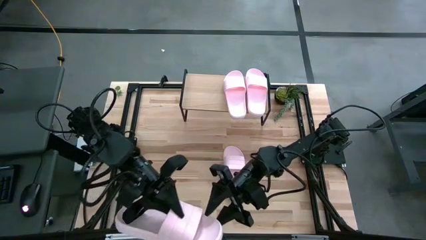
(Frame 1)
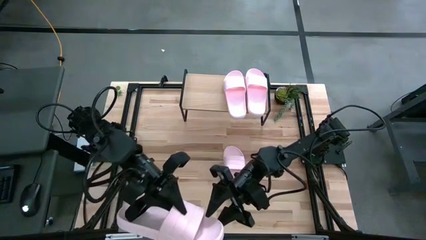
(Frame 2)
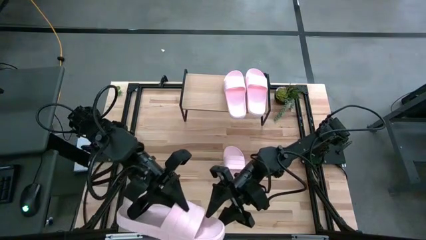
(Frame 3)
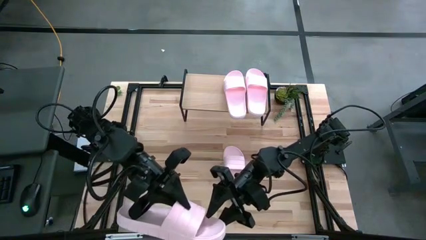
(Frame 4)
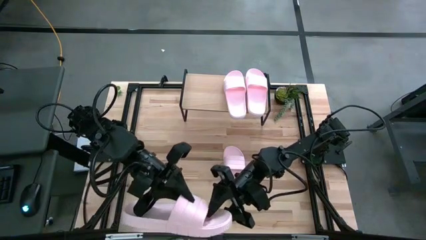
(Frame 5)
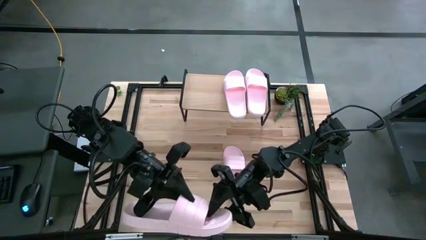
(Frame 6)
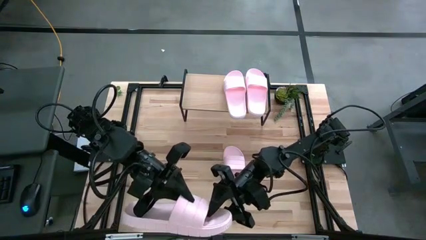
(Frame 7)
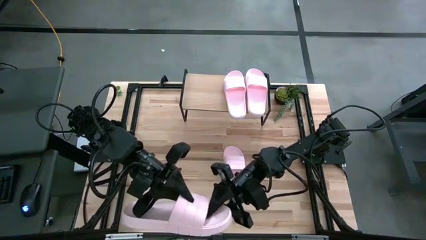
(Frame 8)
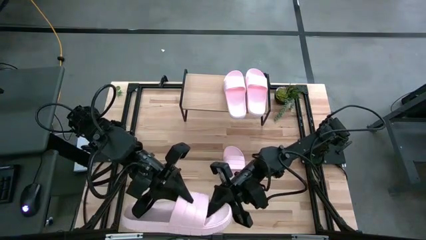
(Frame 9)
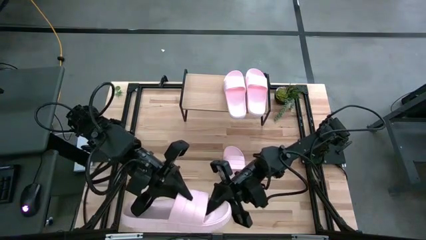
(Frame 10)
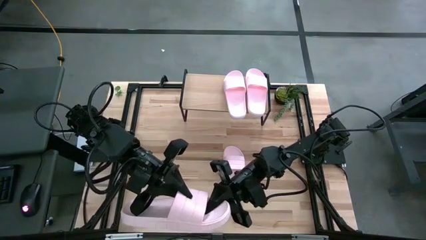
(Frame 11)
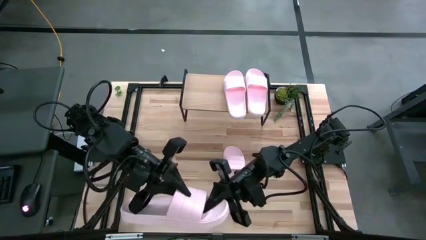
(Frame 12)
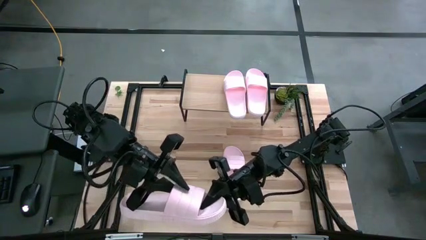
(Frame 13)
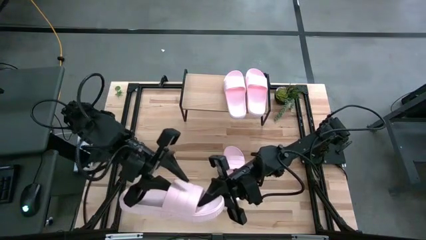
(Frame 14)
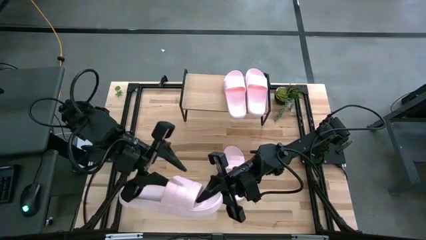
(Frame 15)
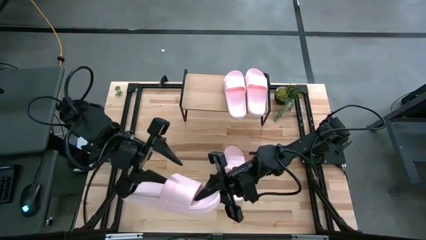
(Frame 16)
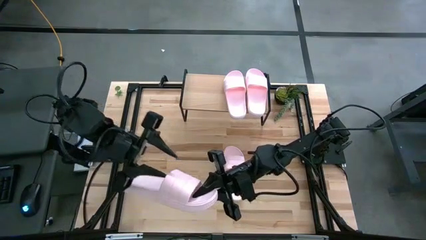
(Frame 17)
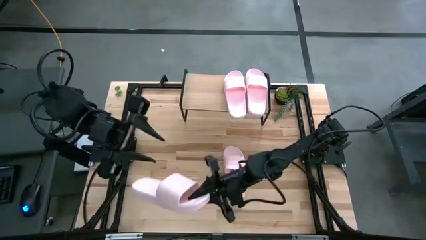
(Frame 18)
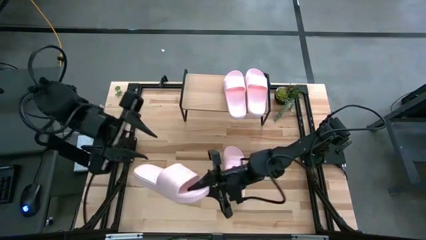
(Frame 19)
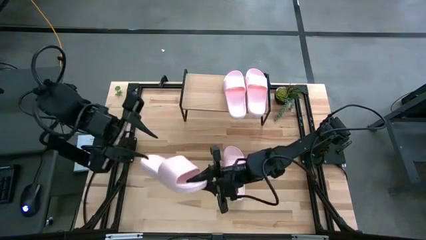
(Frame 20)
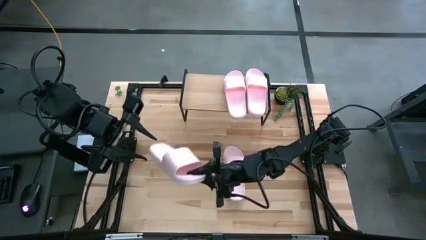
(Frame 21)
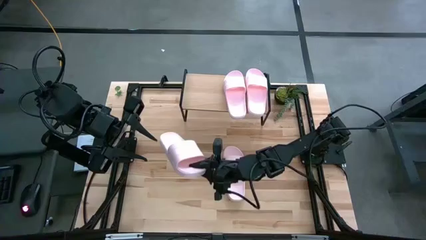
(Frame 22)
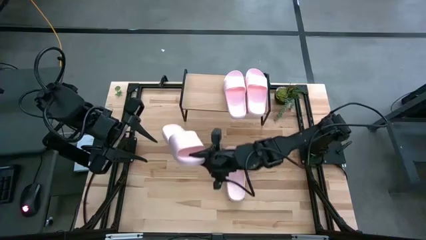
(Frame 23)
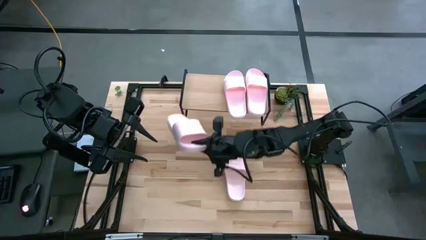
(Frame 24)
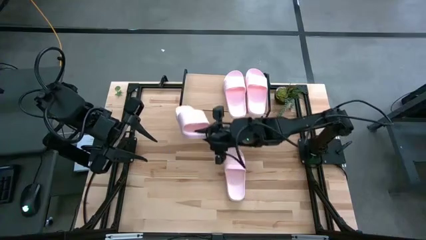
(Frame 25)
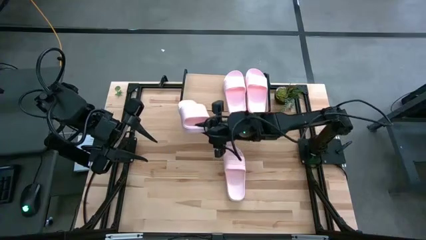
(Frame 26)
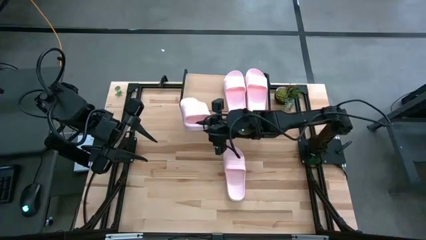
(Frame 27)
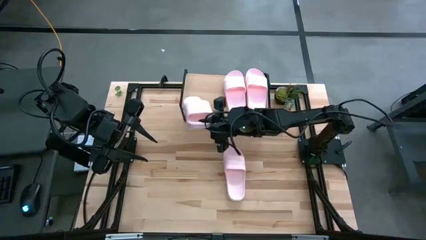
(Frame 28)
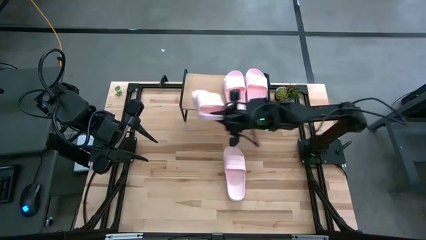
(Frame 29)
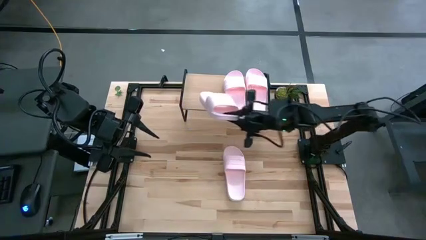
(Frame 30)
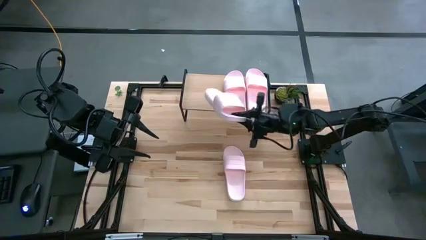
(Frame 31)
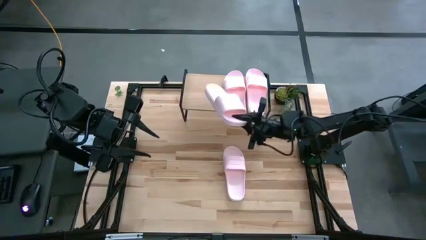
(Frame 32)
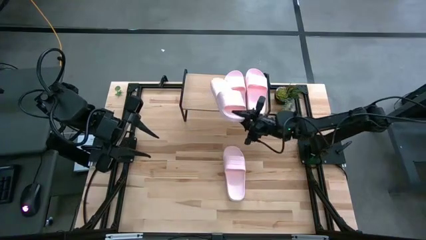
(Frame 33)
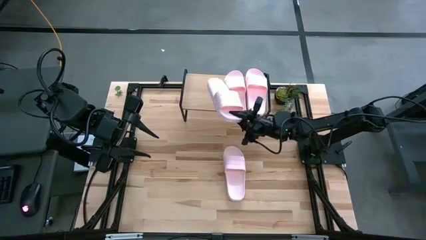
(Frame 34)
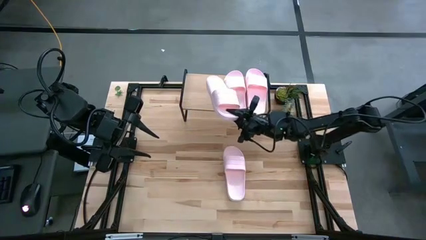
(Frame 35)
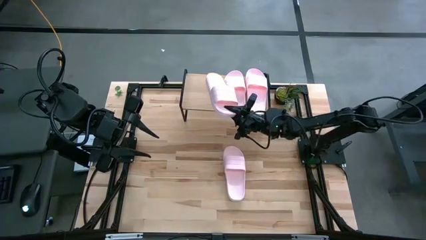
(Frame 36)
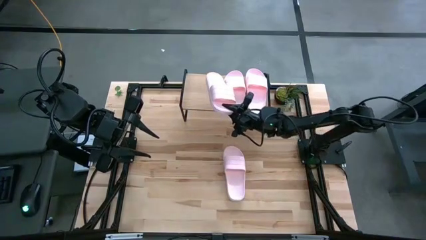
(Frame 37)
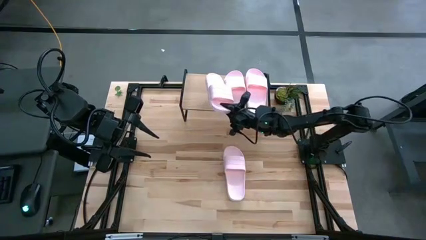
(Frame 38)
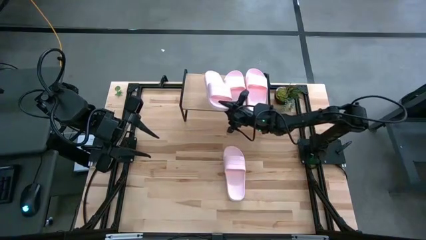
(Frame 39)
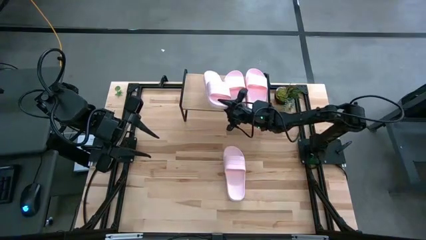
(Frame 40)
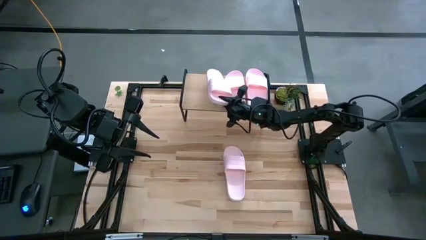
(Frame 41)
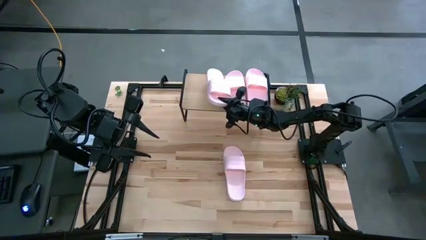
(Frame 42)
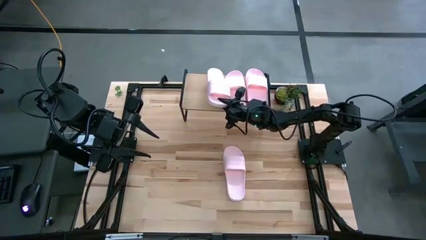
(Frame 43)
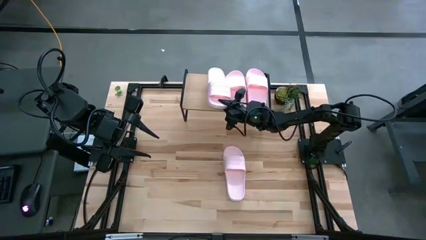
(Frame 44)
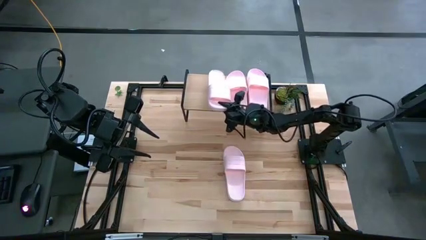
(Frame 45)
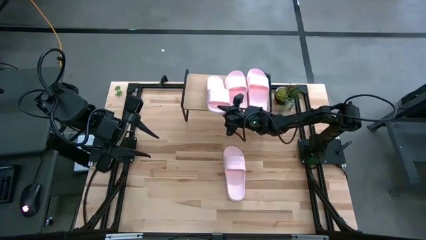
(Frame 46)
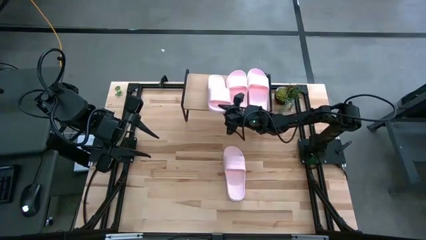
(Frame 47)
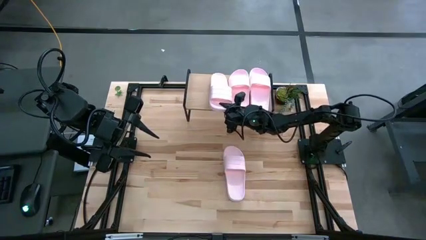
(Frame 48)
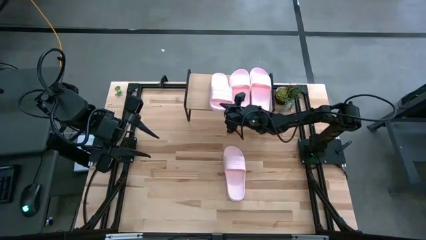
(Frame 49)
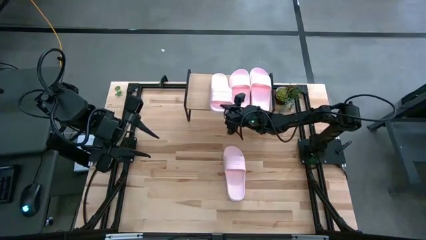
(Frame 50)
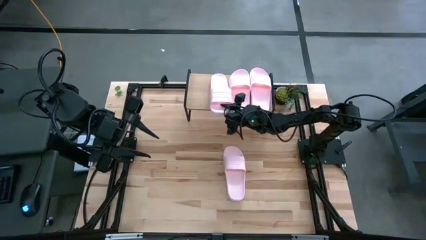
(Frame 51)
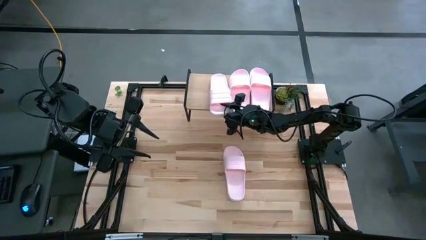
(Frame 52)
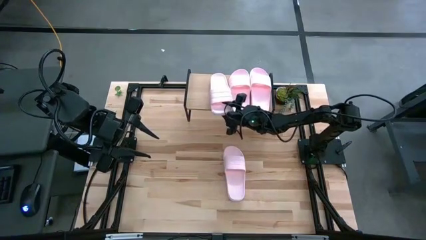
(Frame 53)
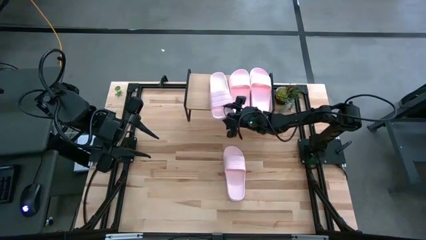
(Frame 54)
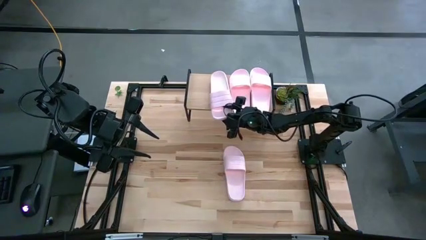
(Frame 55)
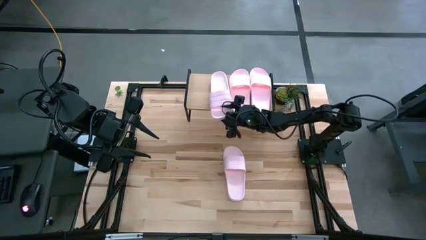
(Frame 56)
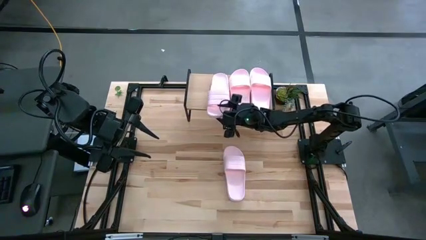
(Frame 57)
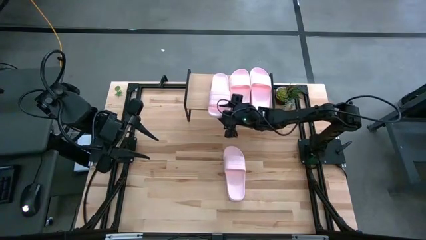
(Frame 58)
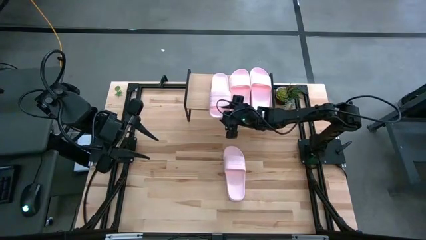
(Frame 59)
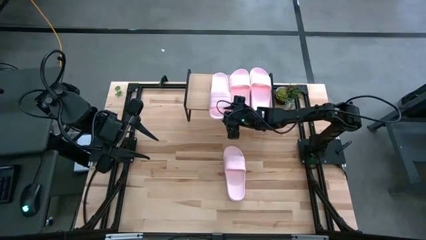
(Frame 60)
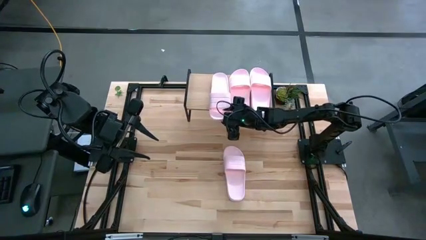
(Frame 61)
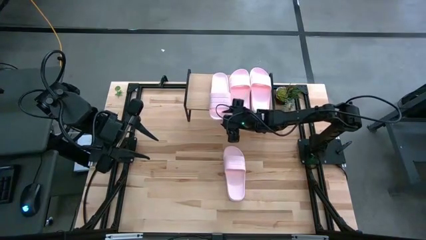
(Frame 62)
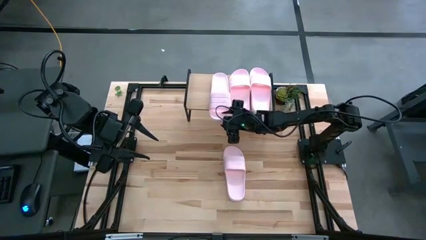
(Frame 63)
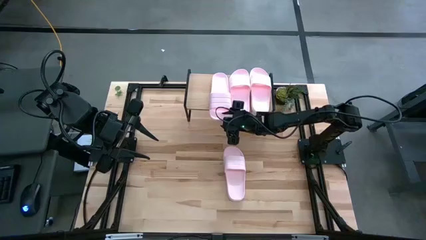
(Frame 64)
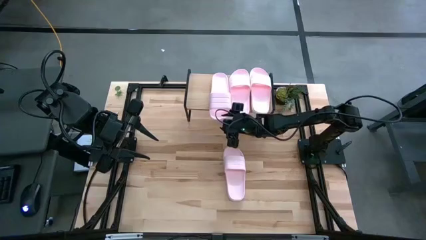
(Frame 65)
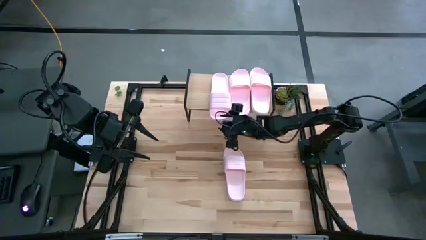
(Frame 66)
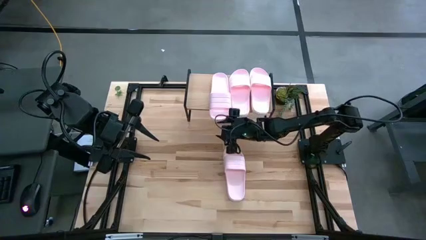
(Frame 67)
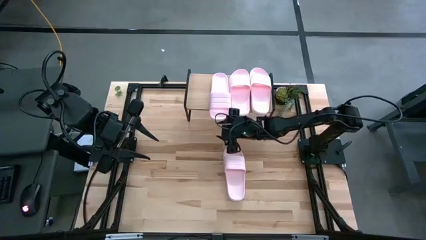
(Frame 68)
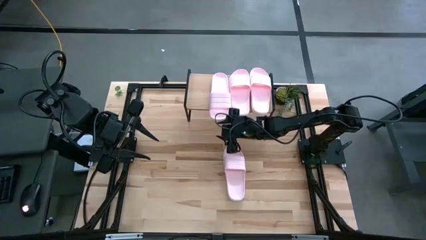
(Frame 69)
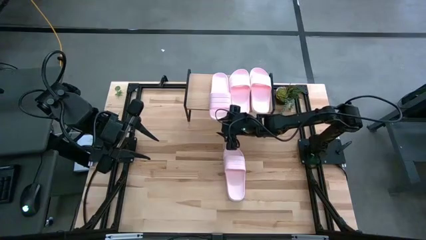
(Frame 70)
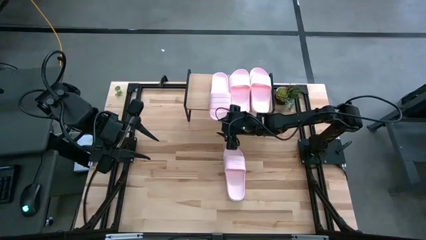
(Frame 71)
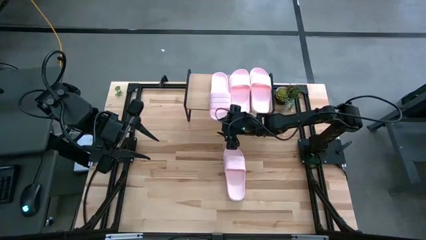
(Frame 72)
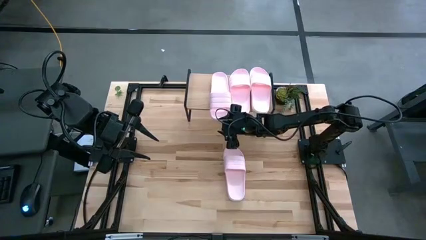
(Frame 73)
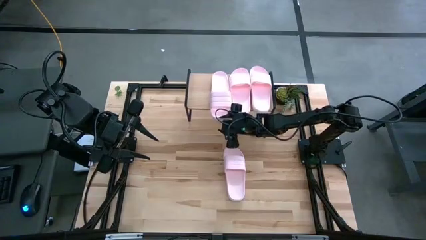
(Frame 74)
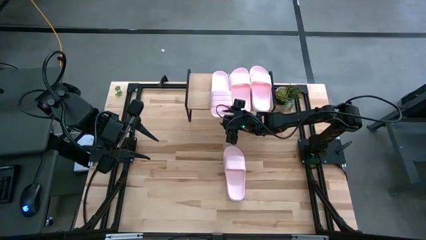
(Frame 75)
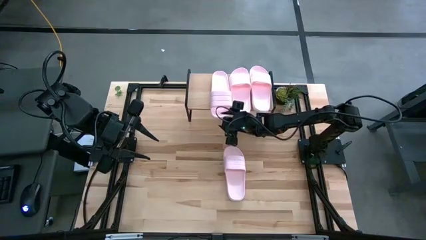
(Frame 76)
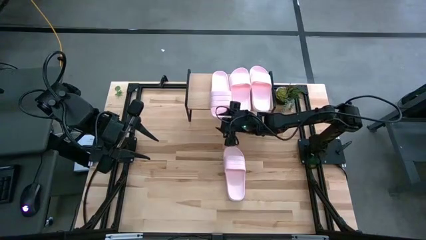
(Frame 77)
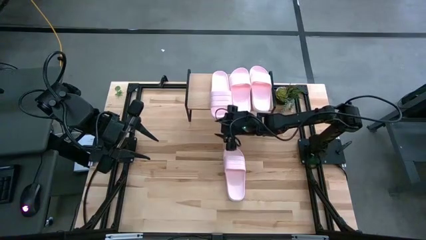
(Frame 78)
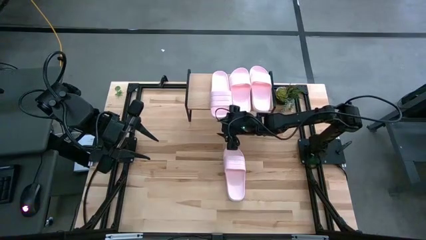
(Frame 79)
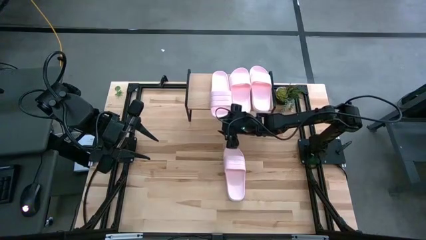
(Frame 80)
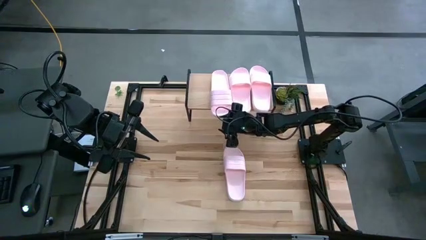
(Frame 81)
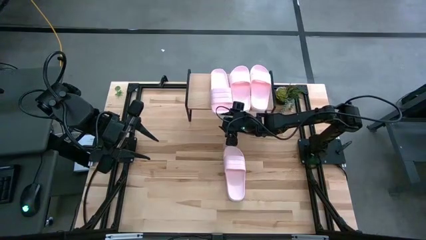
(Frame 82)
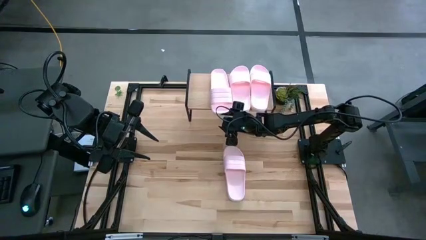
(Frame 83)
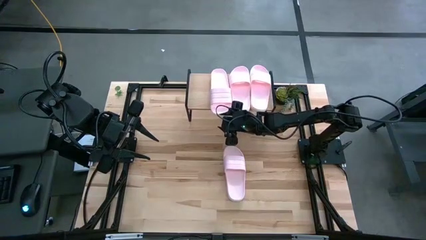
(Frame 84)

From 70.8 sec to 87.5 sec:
Task: Pick and place slides into the shelf
Put the pink slide on the shelf
